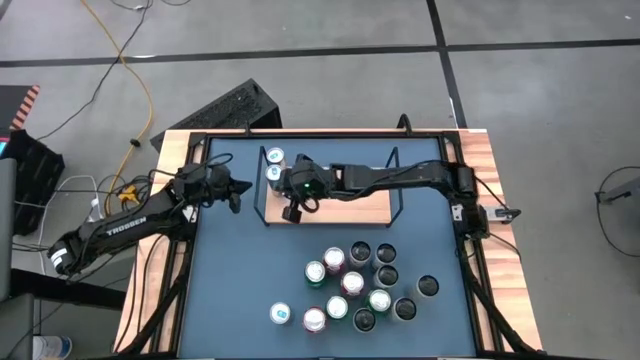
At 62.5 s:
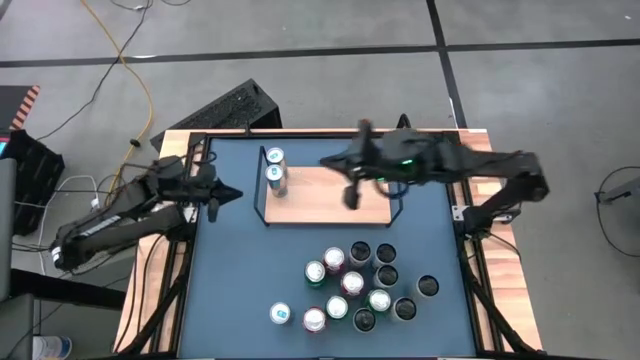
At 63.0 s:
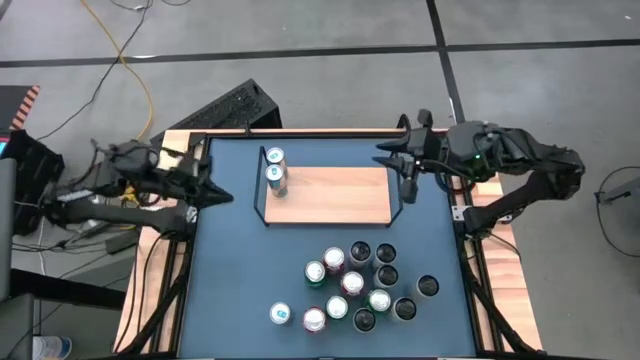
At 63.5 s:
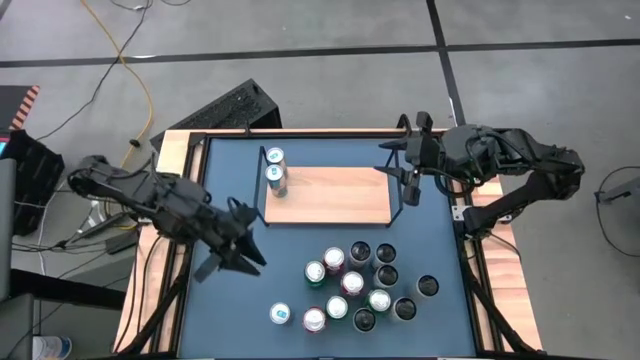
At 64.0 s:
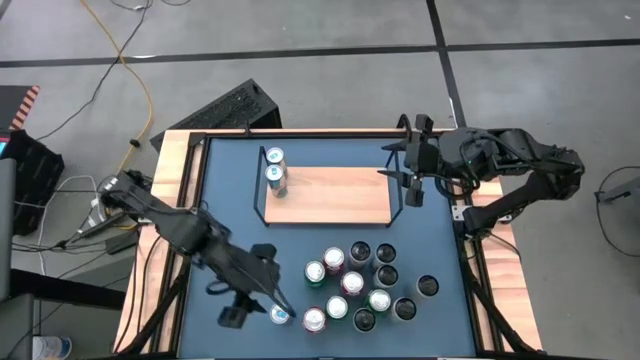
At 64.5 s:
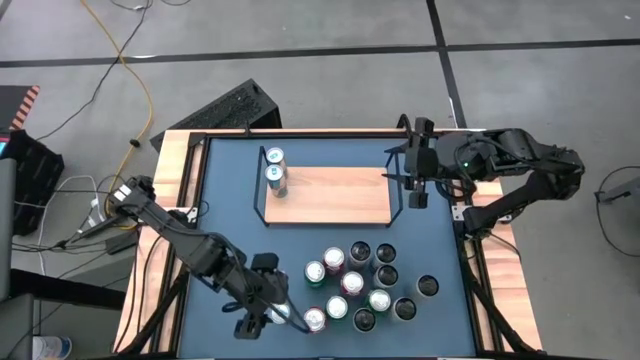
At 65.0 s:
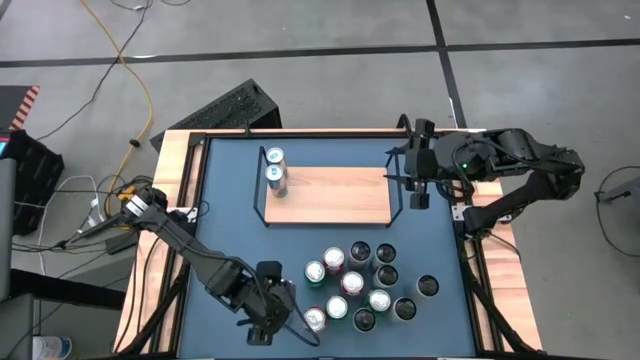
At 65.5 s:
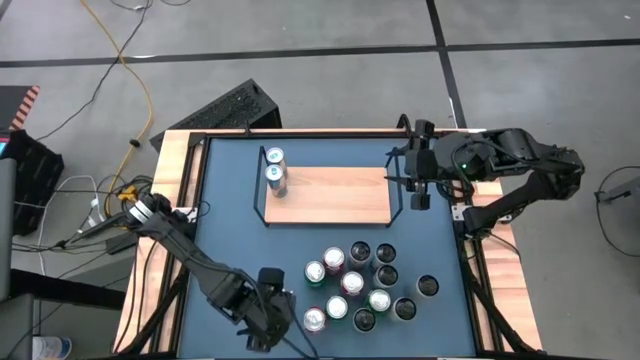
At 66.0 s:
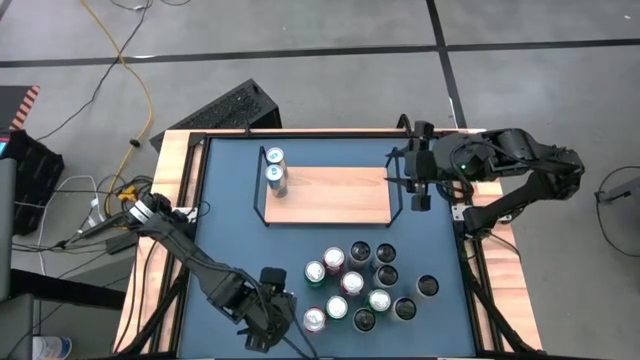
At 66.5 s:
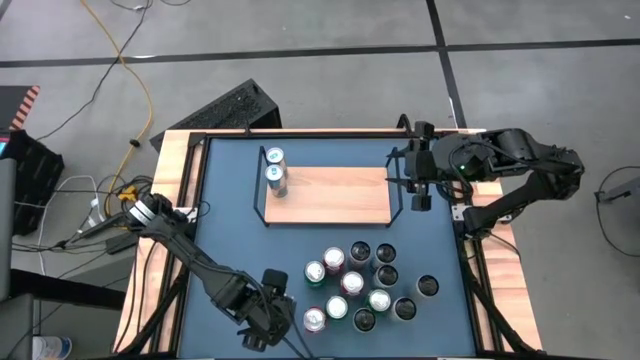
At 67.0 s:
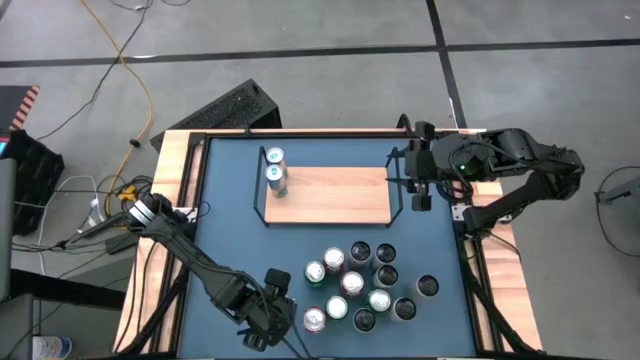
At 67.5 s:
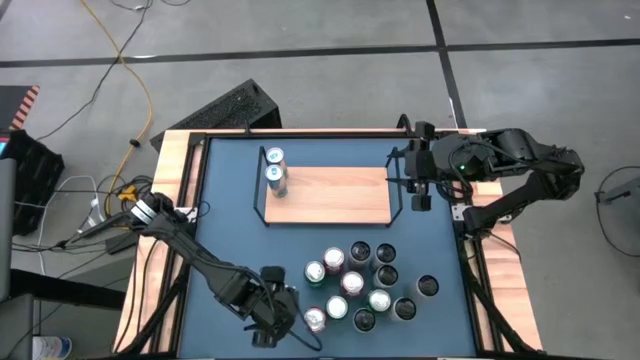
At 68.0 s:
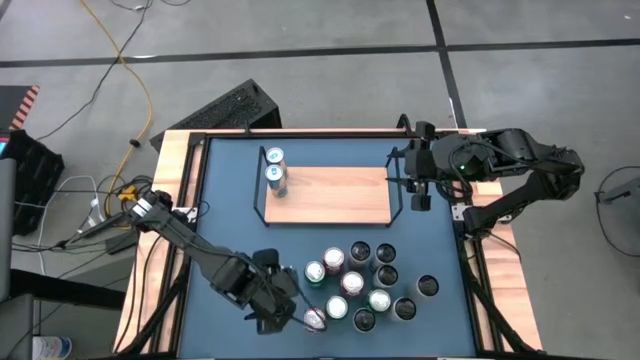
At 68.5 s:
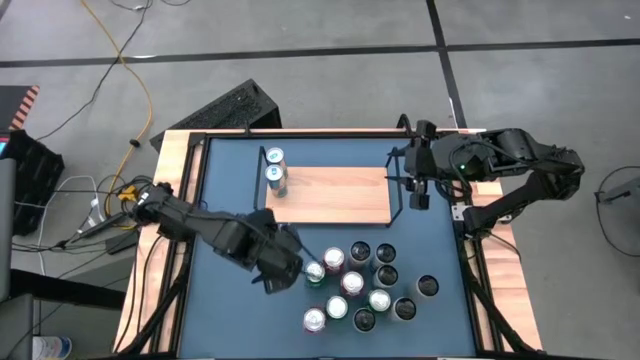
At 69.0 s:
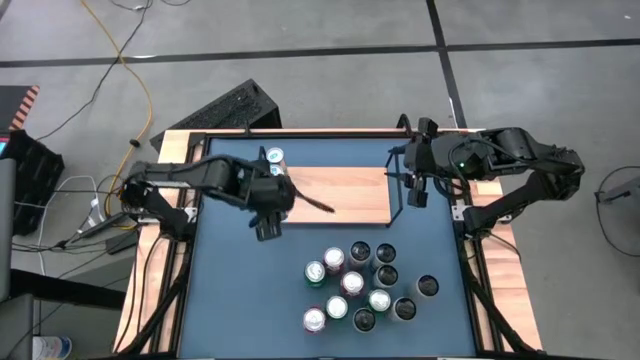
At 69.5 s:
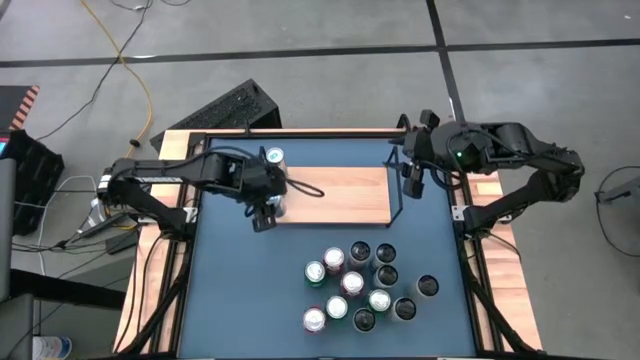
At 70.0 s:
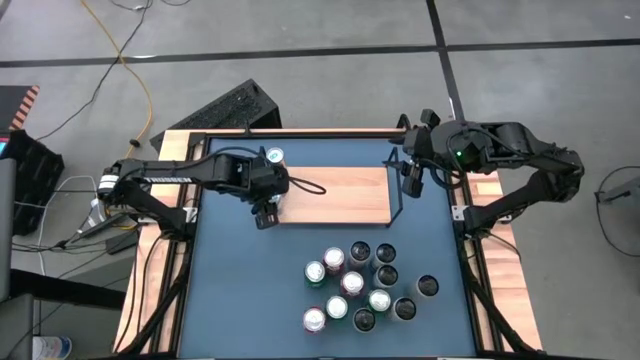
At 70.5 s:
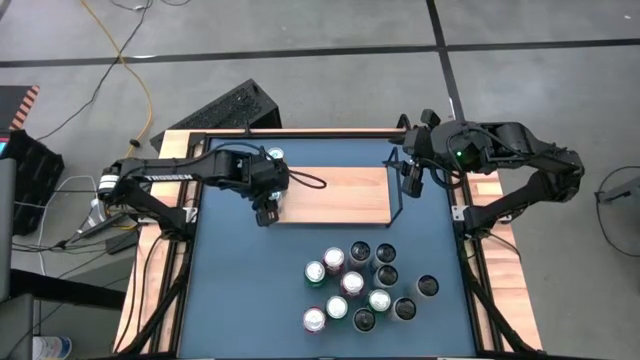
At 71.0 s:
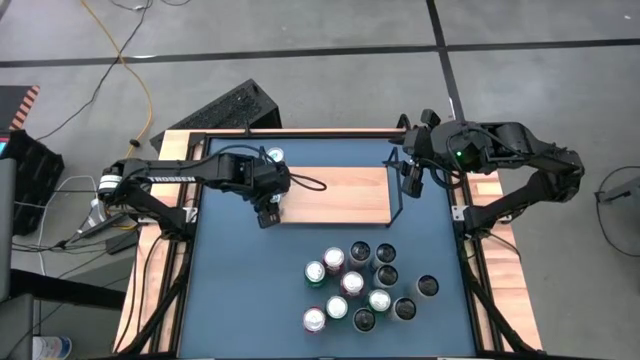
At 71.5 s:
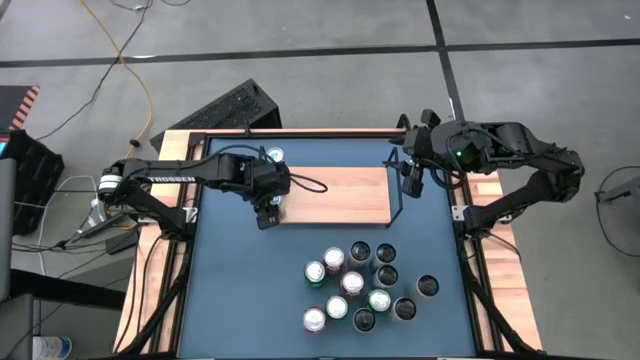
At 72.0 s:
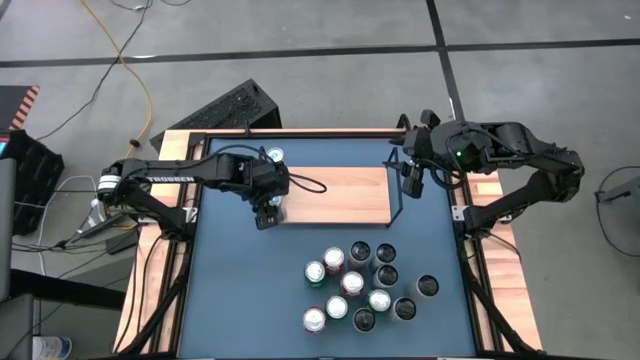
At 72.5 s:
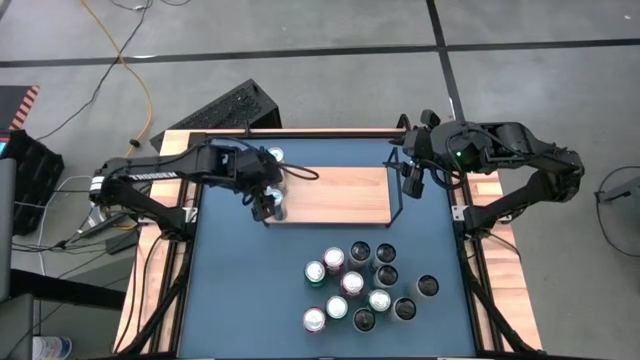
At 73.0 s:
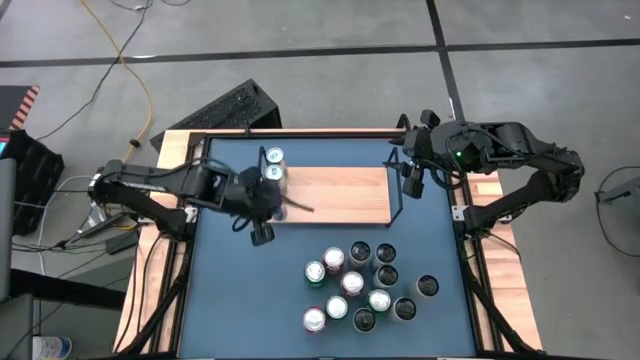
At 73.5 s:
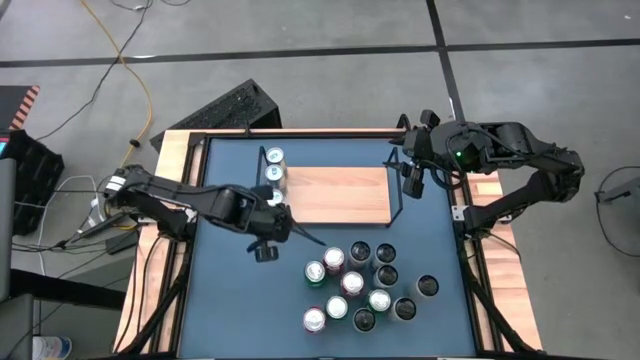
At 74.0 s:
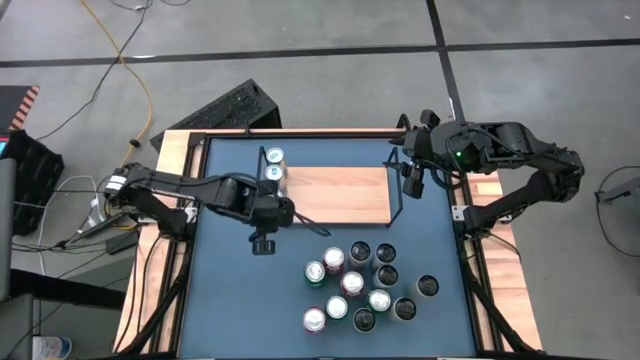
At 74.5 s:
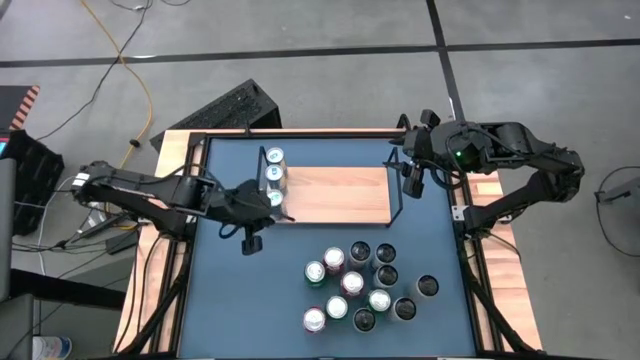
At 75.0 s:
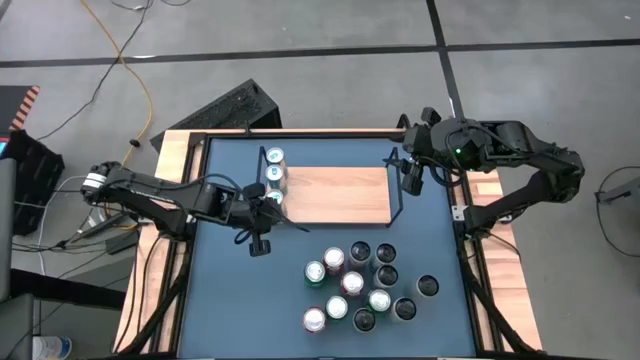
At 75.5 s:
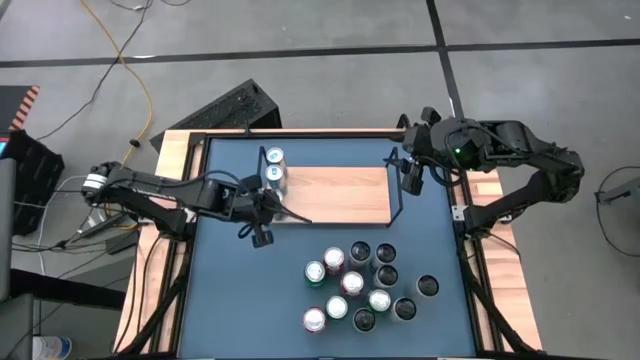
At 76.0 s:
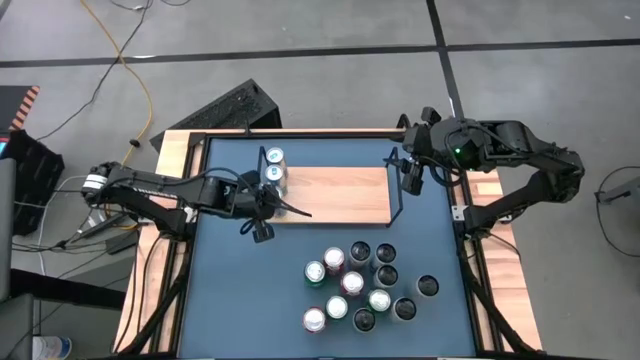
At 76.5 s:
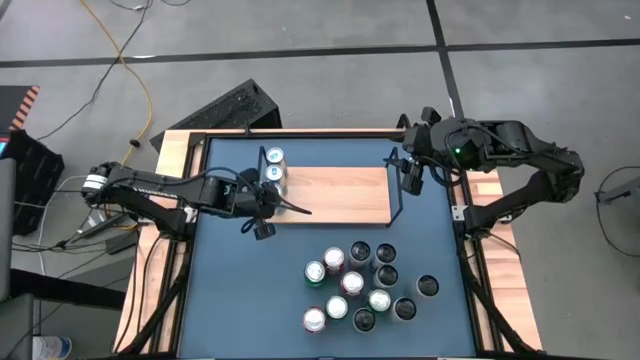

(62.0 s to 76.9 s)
Task: Place canned beverage on shelf
Put the blue soda can on the shelf aligned with the other blue soda cans
